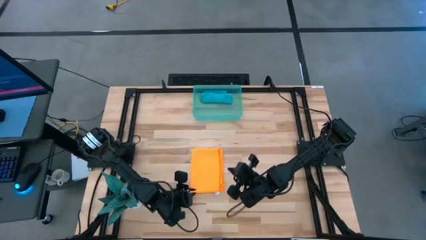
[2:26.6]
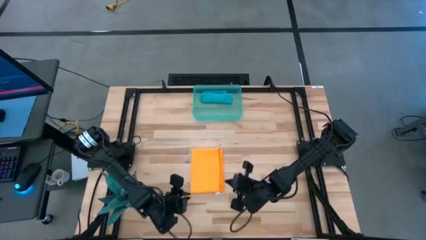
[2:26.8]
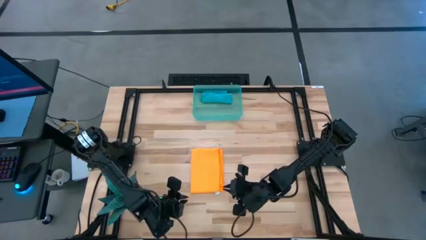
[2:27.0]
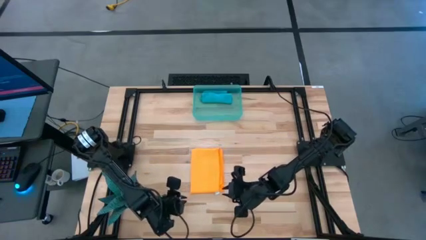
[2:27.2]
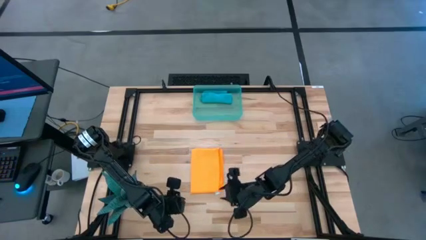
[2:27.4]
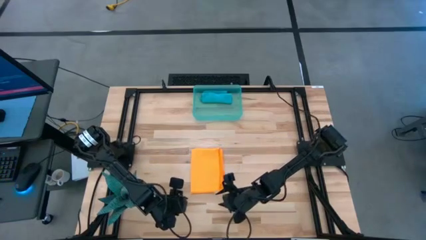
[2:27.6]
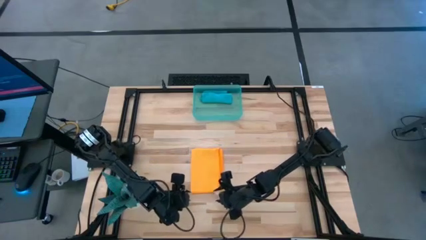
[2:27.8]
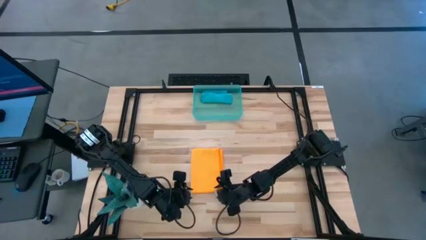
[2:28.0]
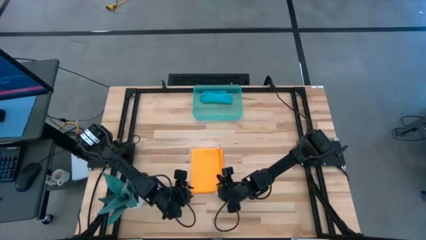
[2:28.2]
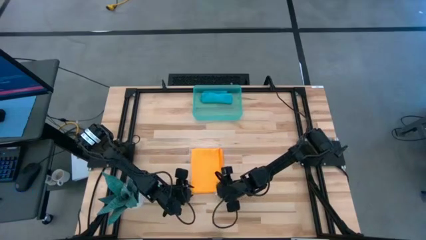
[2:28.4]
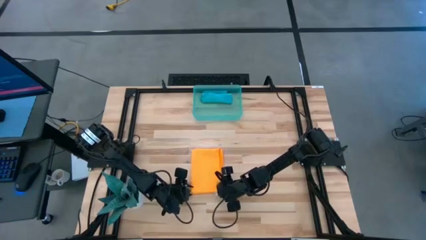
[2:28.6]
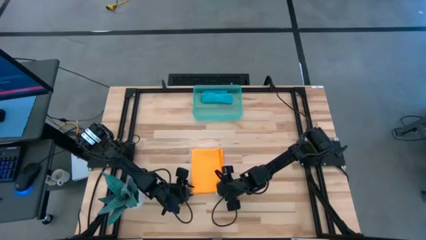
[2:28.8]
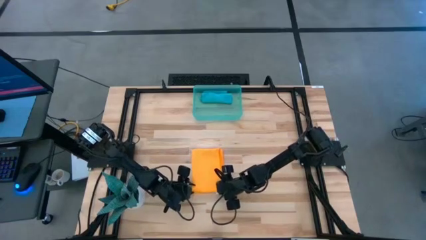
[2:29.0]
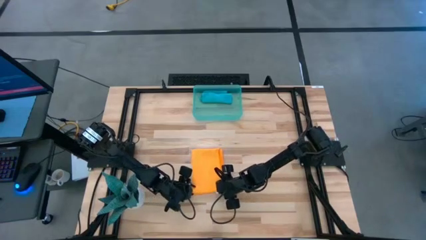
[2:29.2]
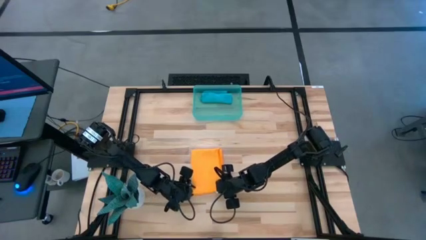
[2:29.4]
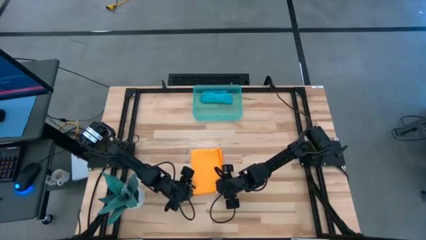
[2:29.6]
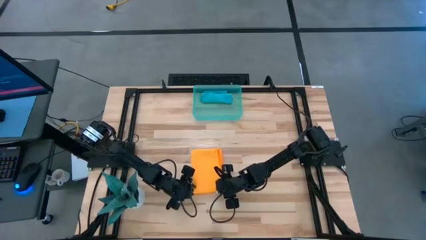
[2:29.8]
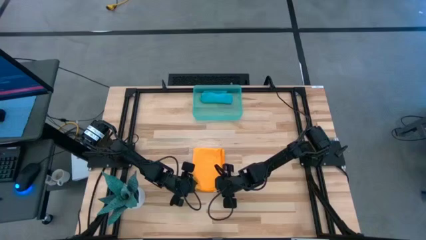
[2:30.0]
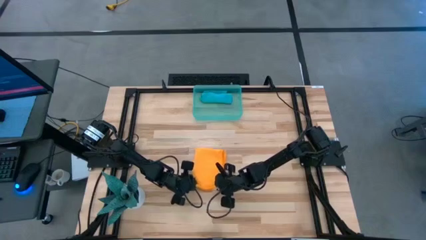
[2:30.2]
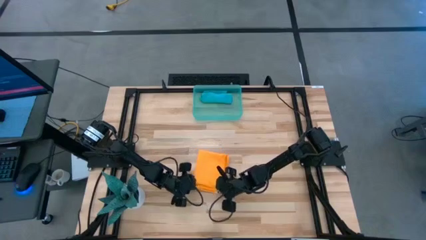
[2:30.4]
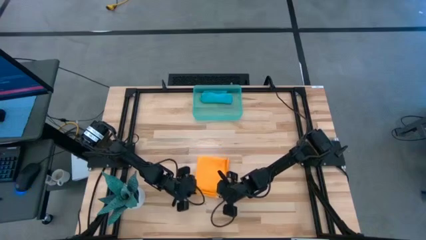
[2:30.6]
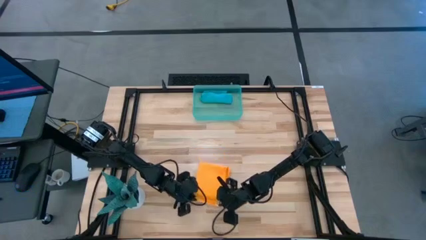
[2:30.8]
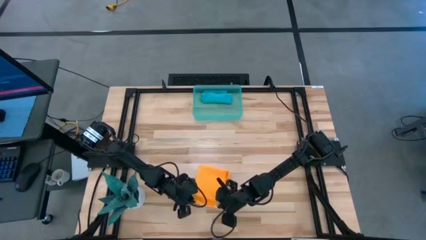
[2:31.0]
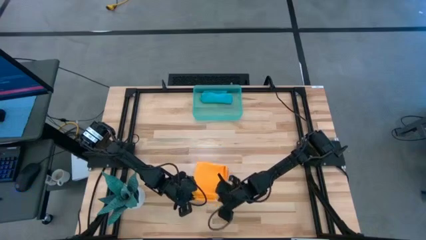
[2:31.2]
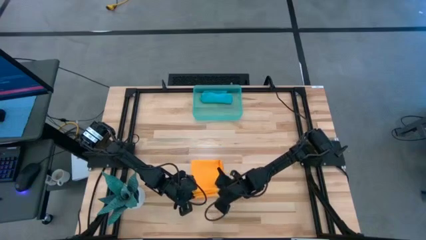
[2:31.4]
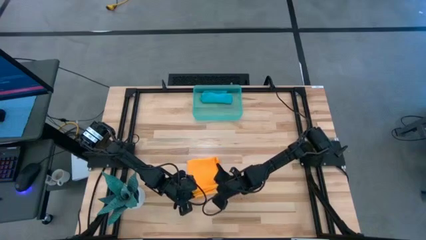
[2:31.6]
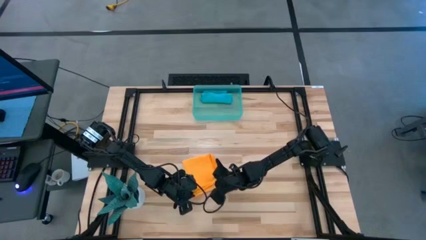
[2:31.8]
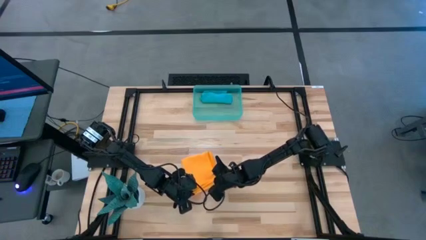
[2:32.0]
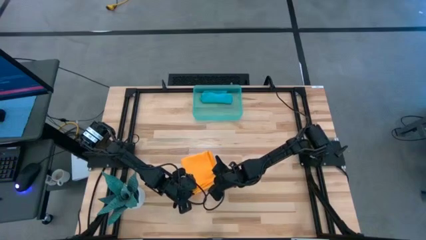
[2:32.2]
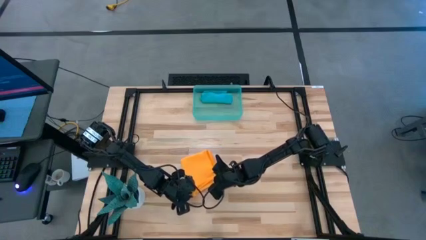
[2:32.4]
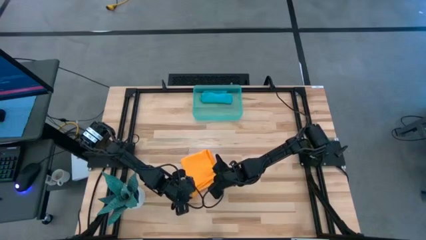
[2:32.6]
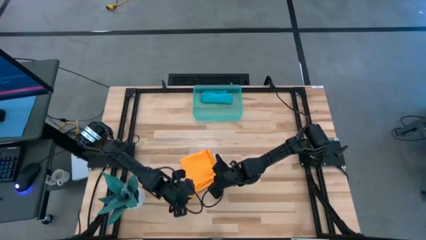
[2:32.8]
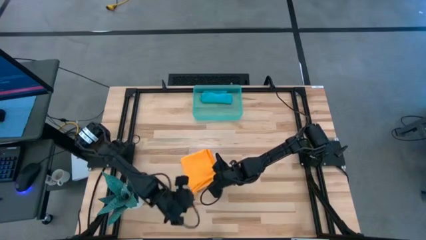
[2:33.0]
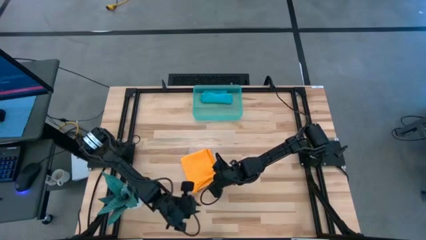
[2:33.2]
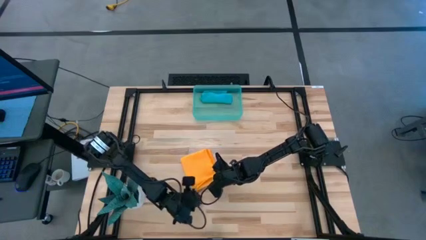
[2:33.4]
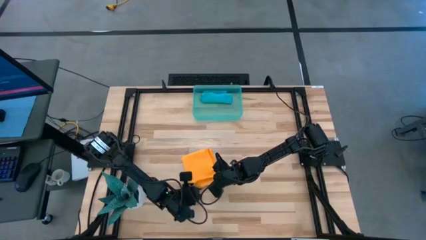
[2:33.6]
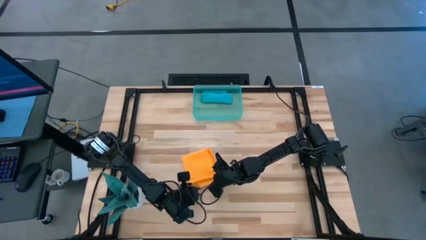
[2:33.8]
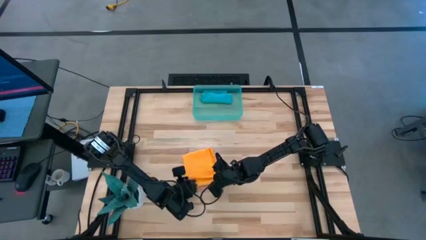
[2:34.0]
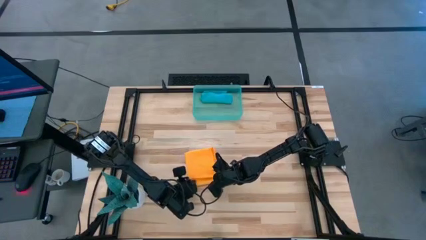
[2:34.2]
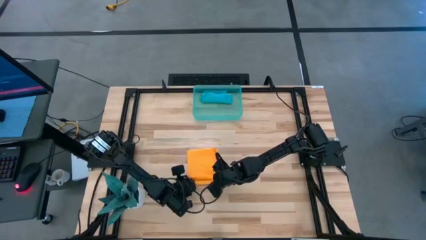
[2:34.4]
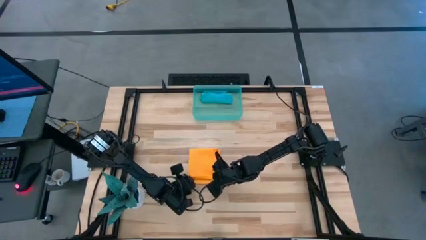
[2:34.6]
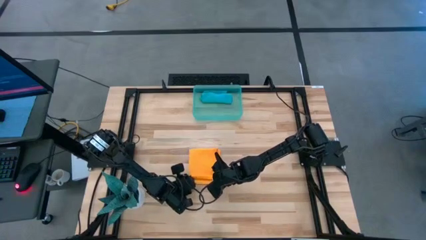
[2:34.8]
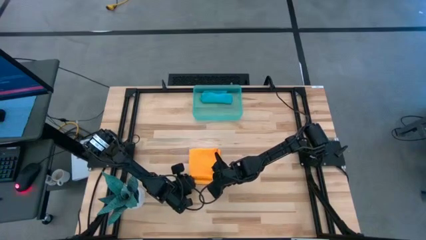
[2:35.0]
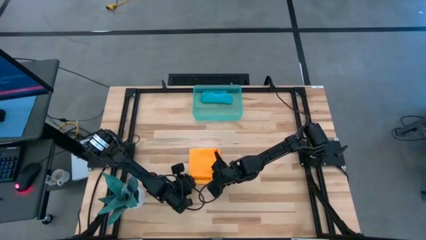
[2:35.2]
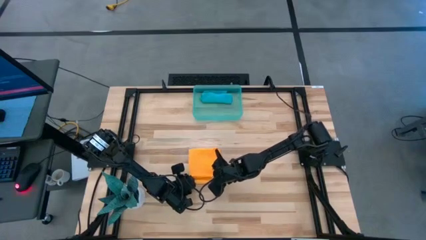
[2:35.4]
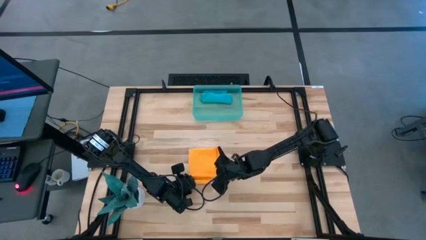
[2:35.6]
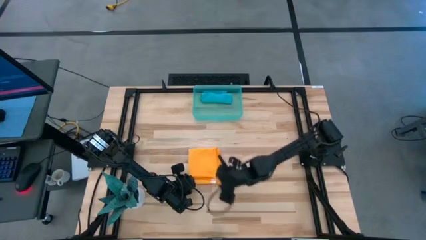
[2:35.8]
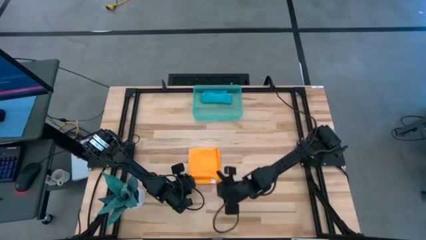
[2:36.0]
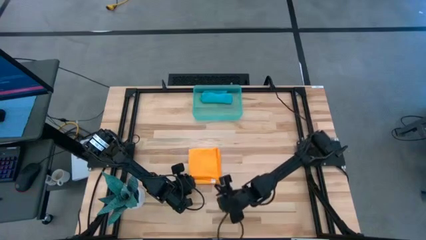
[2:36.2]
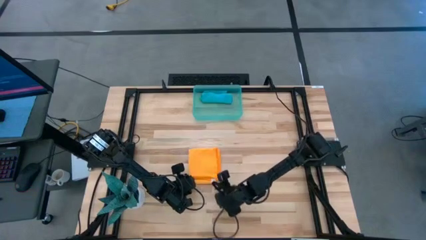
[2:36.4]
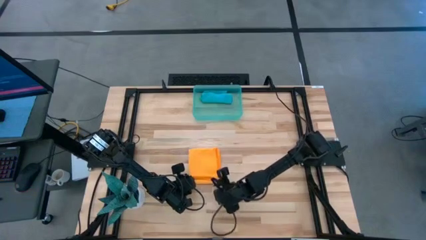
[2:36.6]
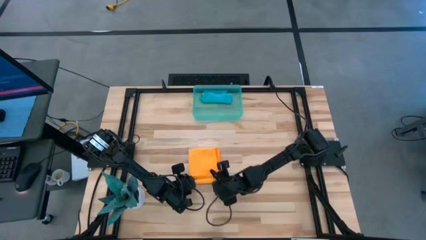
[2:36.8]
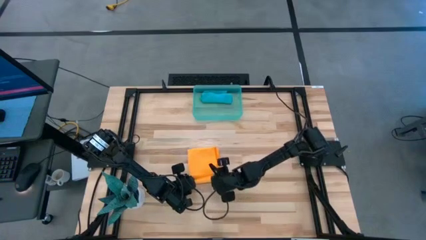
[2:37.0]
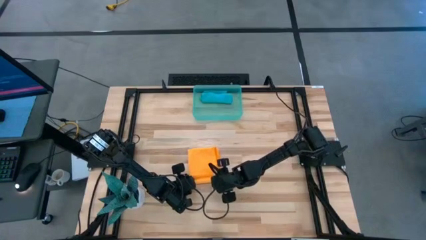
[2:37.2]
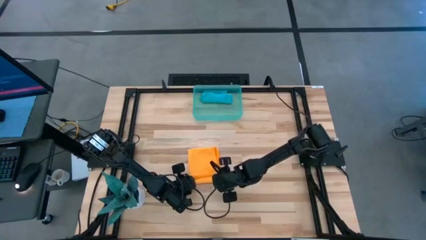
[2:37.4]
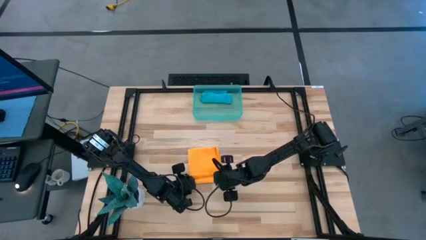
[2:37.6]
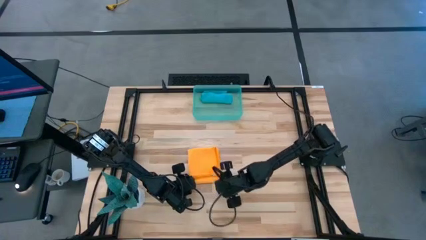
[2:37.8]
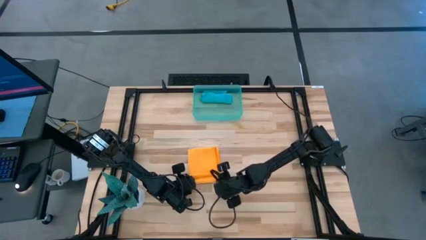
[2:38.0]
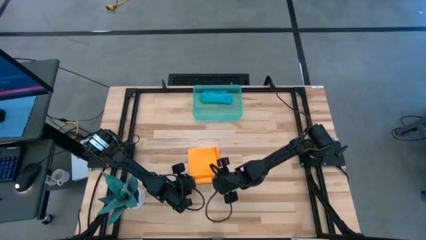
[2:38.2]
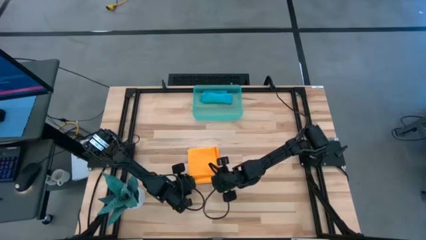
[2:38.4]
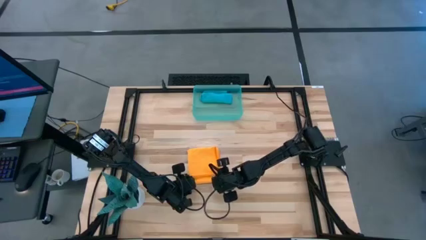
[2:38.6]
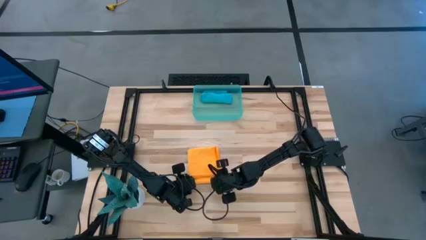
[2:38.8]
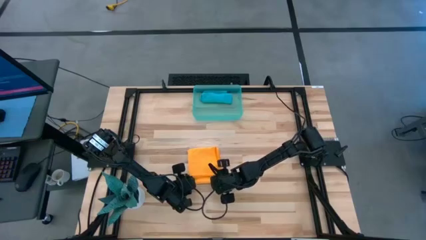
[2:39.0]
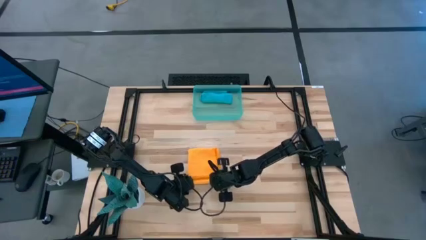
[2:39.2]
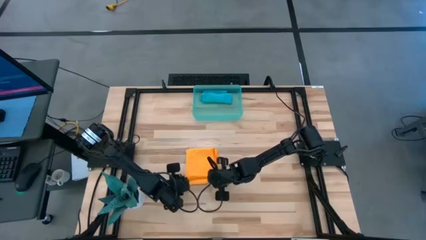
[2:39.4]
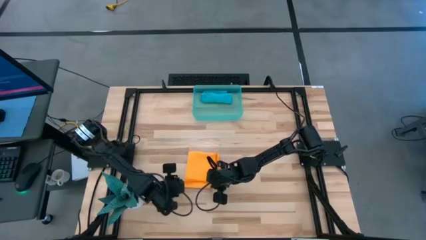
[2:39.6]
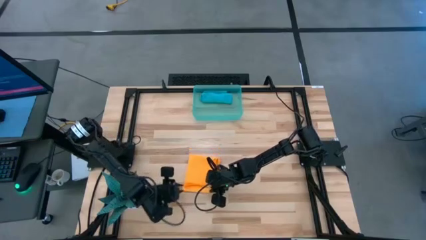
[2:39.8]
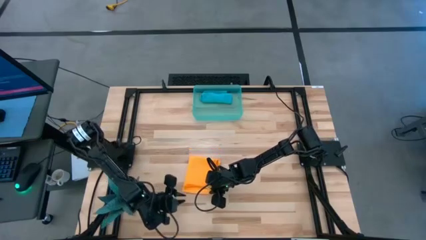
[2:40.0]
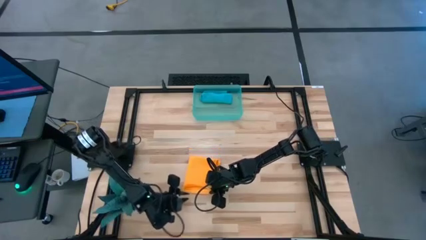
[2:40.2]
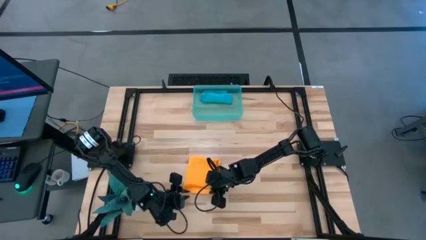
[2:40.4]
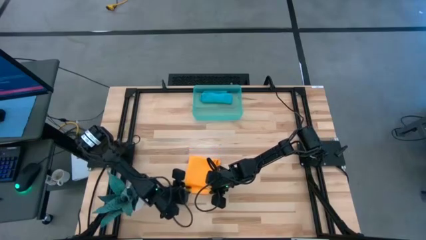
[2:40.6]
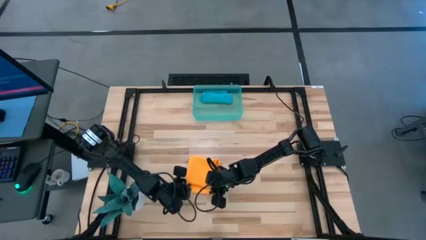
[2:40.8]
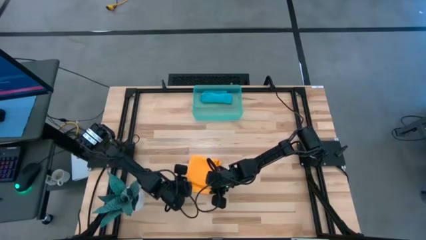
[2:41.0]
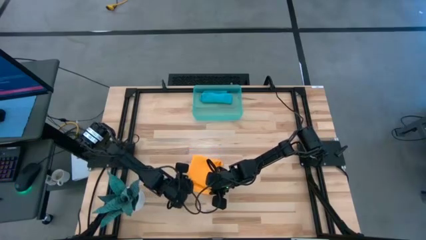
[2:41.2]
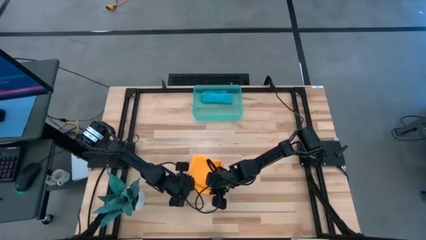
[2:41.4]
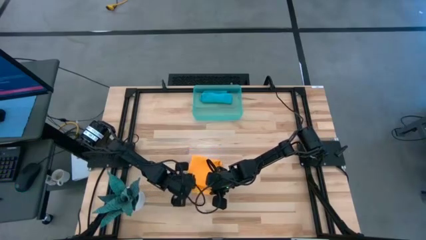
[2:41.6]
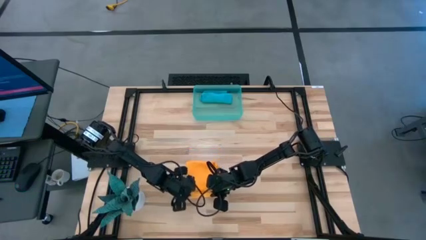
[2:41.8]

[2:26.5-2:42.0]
Task: Roll microfiber towels into tight, uniform cylinder then place into a basket
Roll the orange microfiber cloth

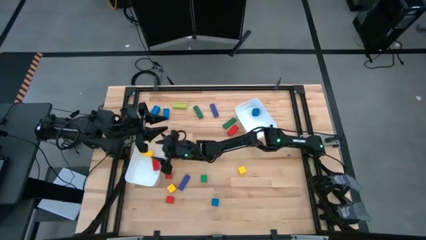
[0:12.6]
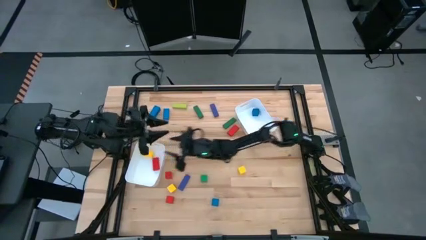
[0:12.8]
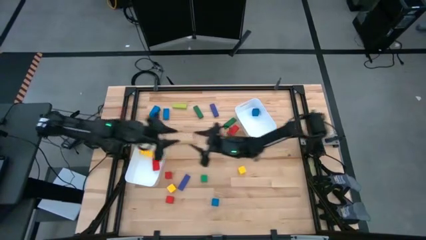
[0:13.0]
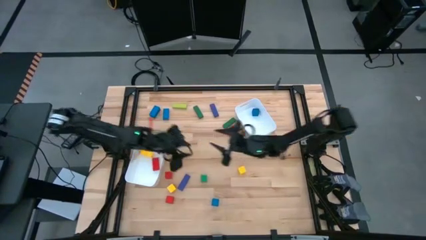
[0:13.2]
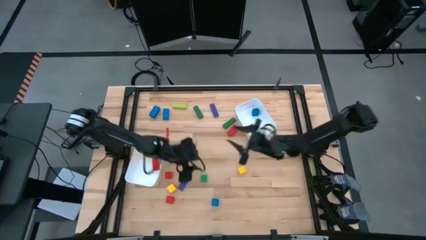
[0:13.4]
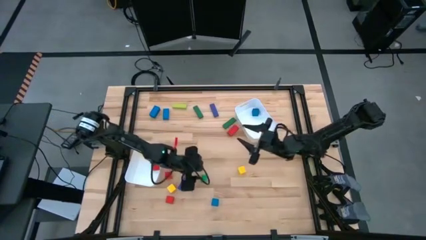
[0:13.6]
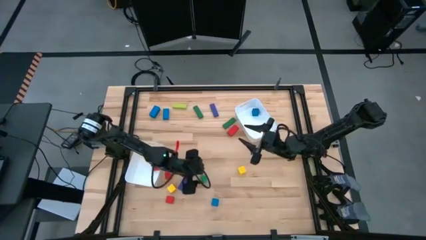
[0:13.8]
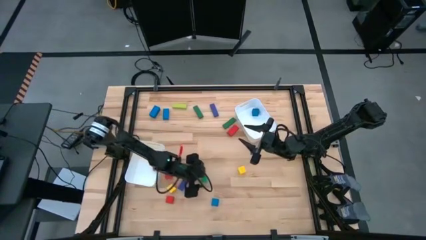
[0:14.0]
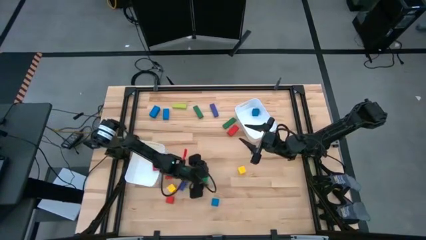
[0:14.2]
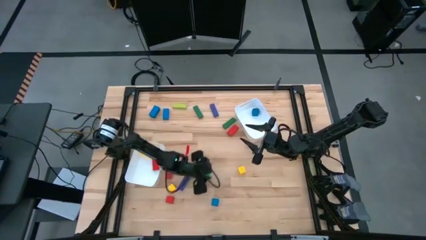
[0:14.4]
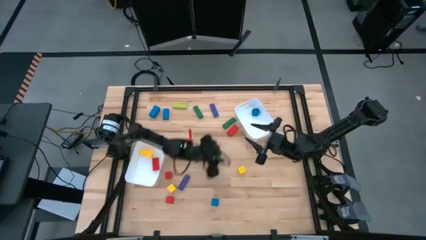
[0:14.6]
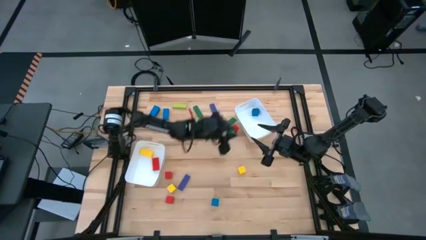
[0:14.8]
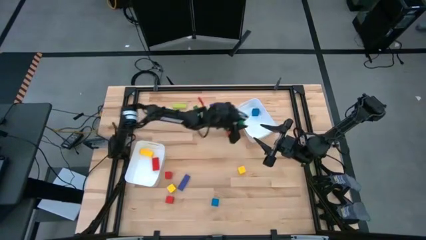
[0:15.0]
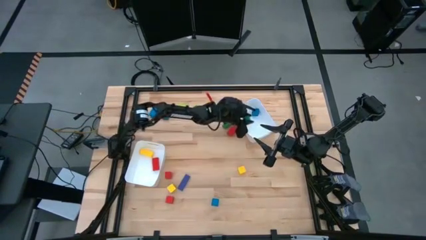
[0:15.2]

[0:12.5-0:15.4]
Task: Sort blocks by size
Put the small green block in the right white bin
